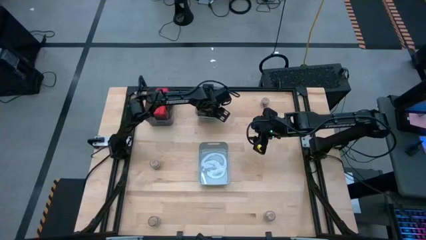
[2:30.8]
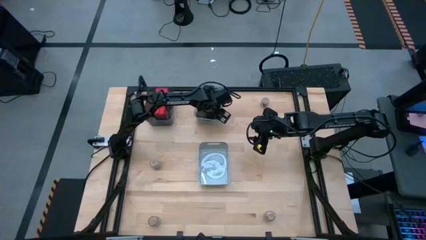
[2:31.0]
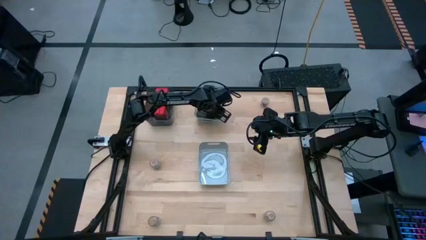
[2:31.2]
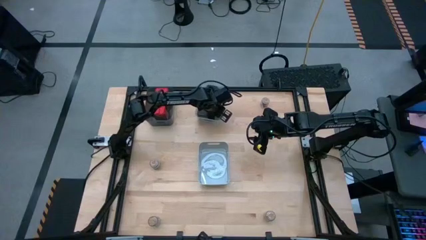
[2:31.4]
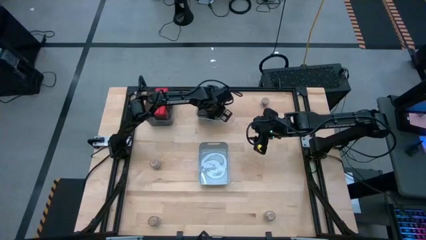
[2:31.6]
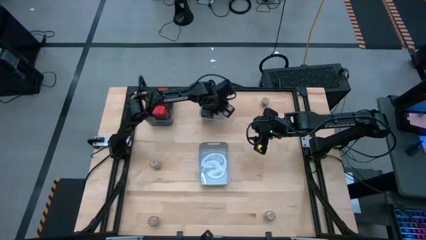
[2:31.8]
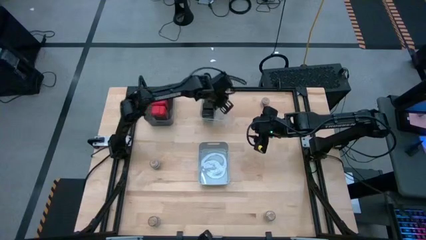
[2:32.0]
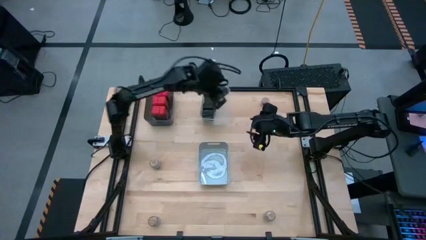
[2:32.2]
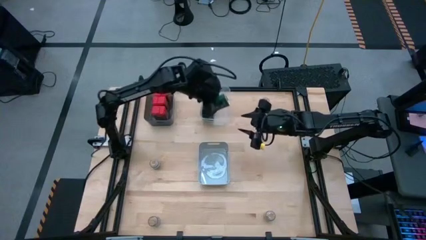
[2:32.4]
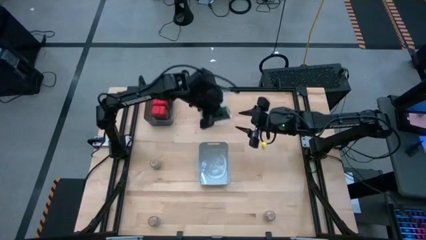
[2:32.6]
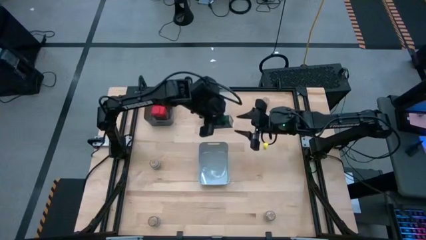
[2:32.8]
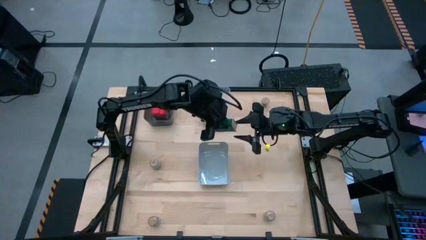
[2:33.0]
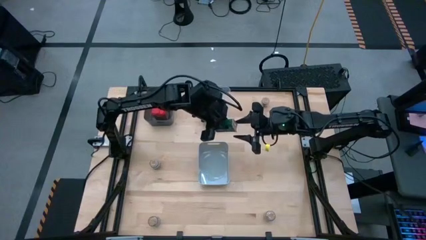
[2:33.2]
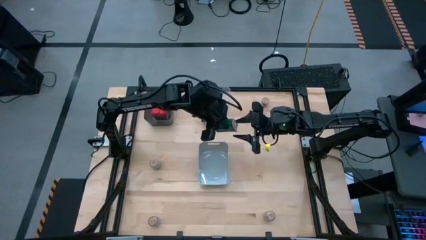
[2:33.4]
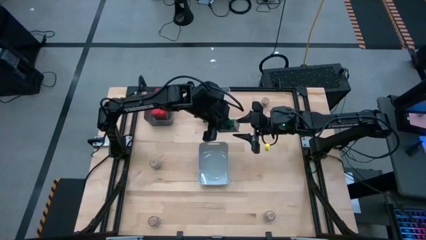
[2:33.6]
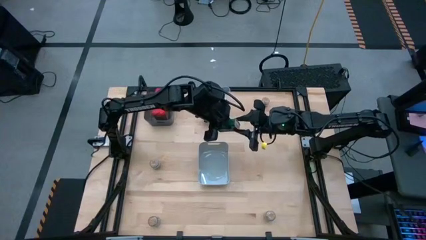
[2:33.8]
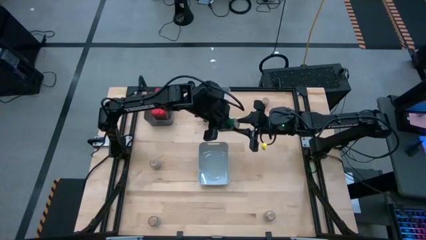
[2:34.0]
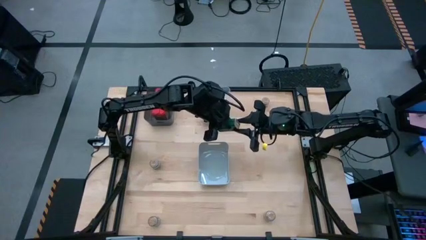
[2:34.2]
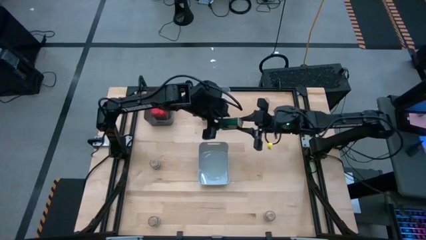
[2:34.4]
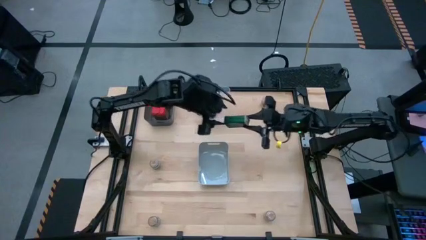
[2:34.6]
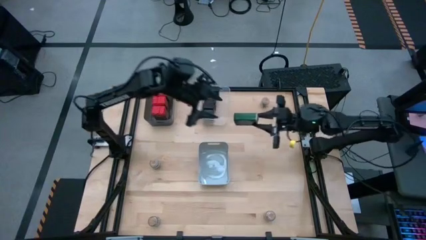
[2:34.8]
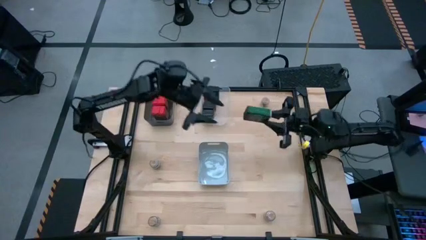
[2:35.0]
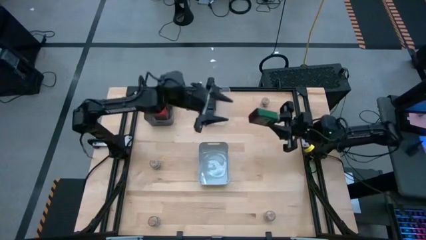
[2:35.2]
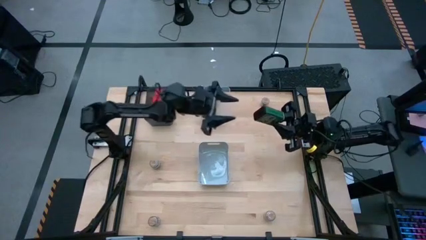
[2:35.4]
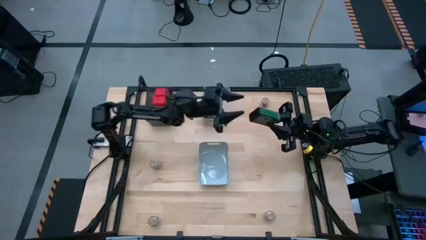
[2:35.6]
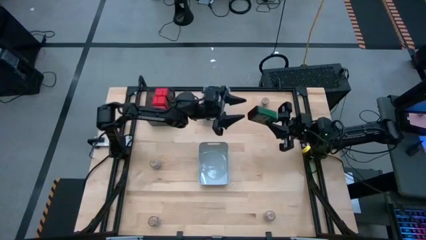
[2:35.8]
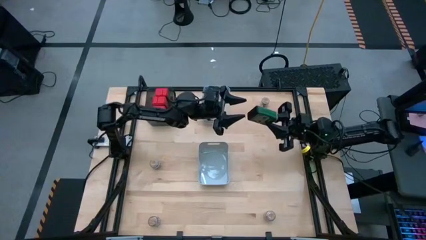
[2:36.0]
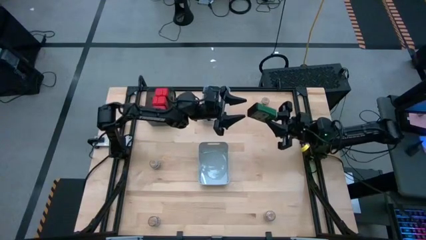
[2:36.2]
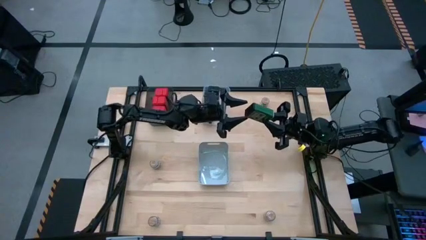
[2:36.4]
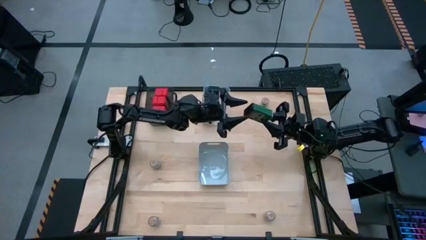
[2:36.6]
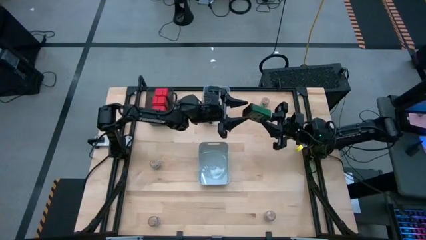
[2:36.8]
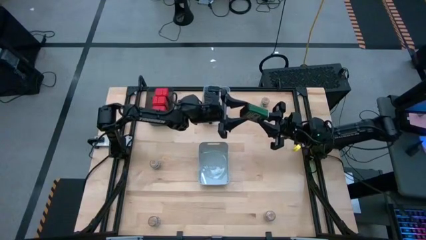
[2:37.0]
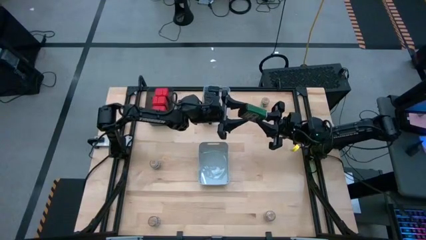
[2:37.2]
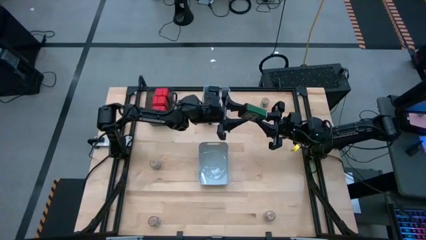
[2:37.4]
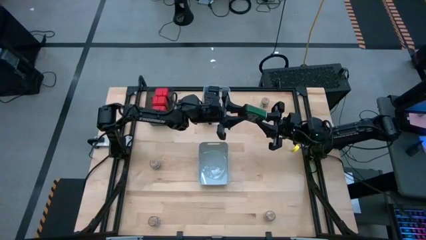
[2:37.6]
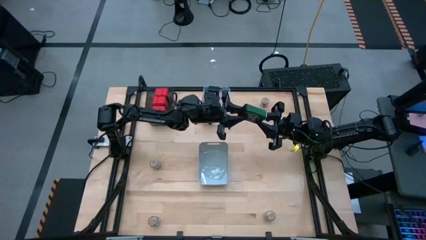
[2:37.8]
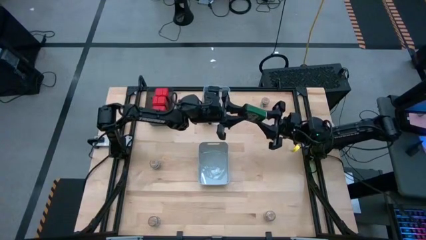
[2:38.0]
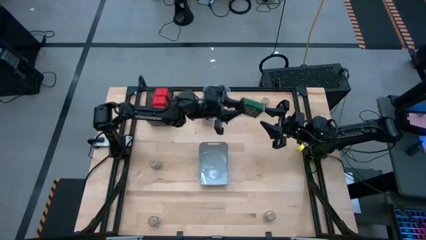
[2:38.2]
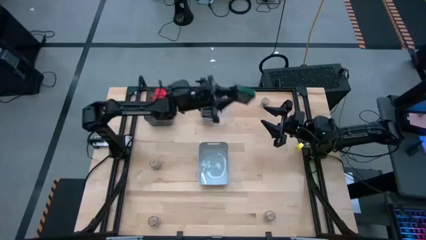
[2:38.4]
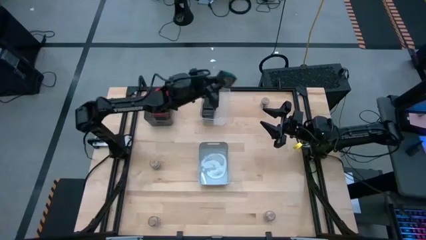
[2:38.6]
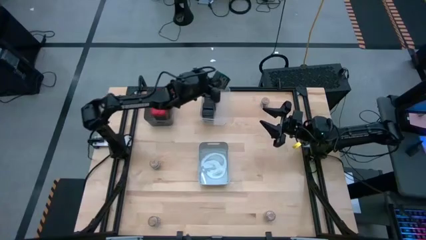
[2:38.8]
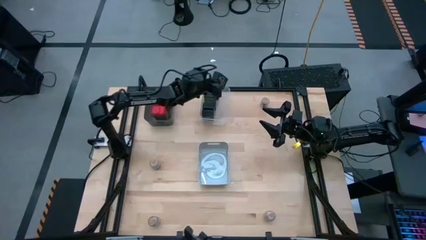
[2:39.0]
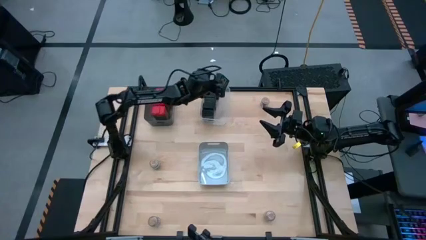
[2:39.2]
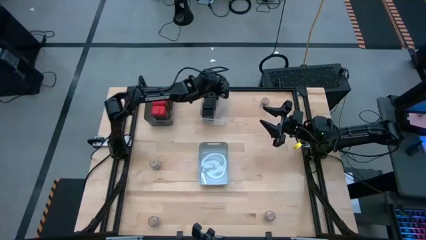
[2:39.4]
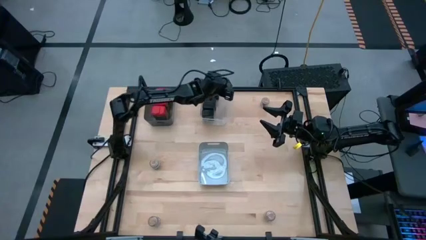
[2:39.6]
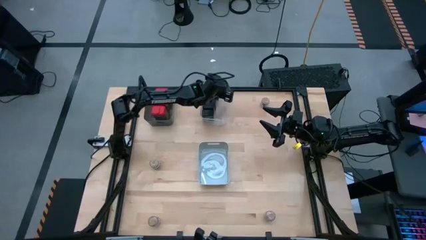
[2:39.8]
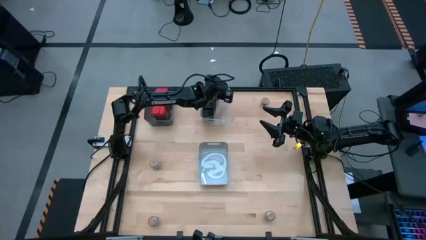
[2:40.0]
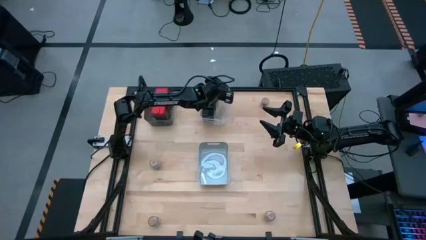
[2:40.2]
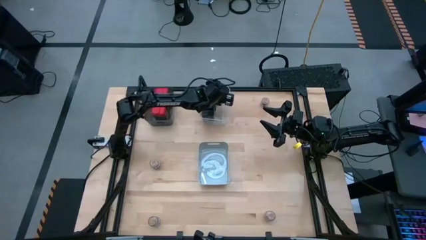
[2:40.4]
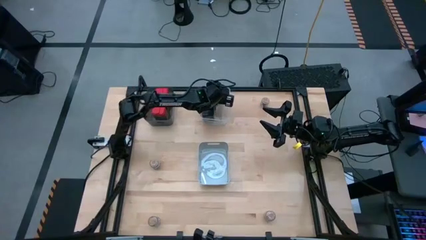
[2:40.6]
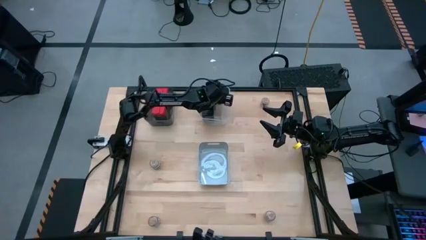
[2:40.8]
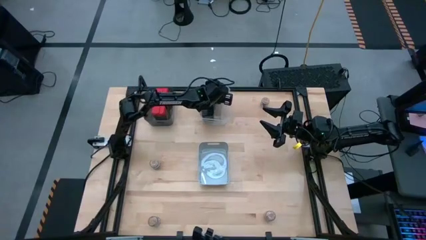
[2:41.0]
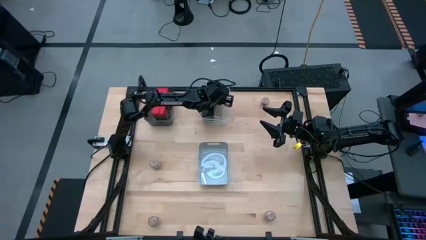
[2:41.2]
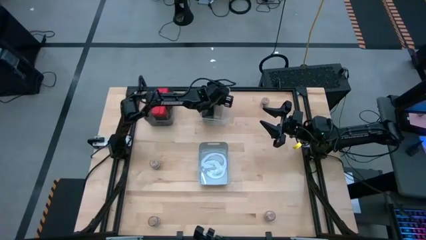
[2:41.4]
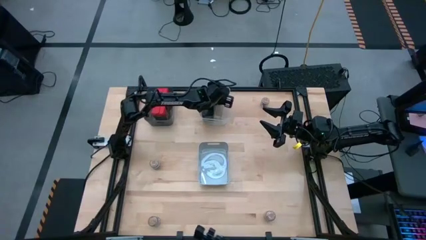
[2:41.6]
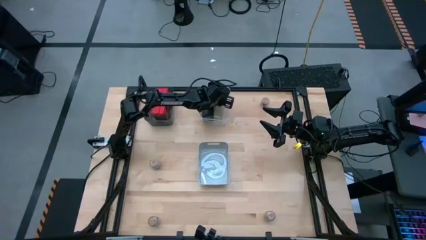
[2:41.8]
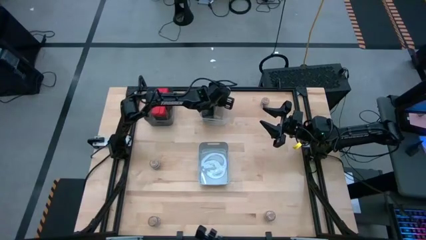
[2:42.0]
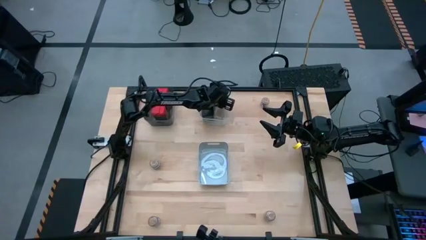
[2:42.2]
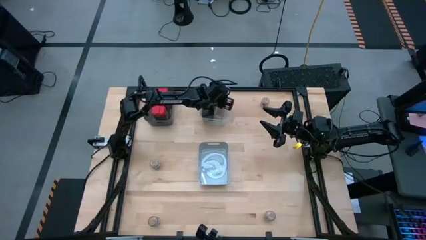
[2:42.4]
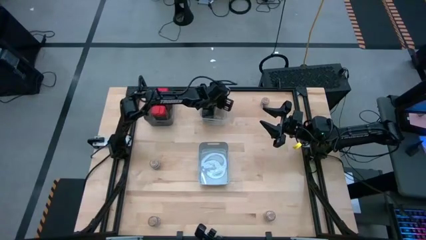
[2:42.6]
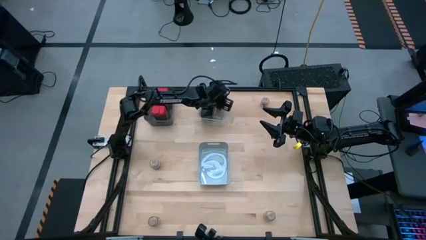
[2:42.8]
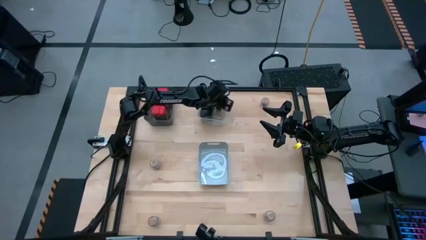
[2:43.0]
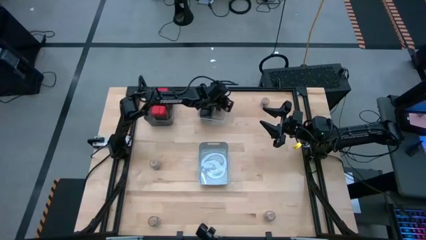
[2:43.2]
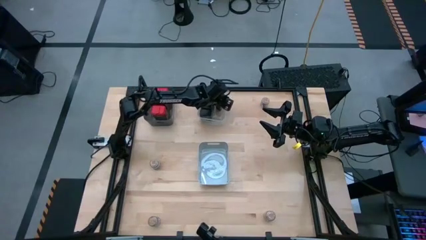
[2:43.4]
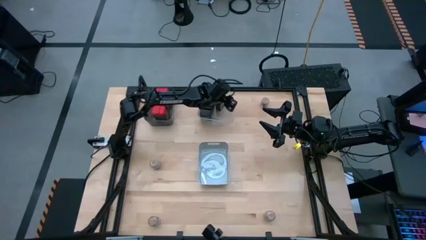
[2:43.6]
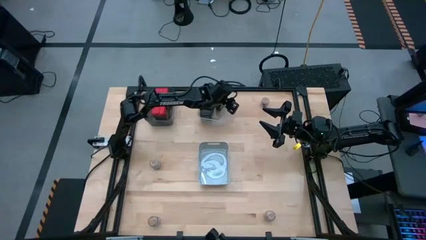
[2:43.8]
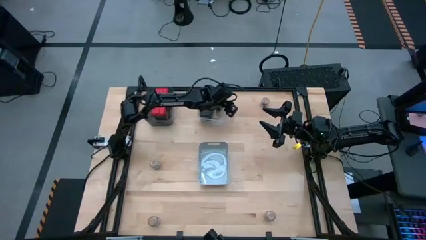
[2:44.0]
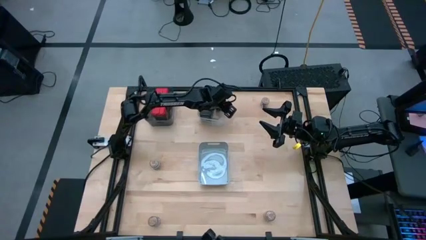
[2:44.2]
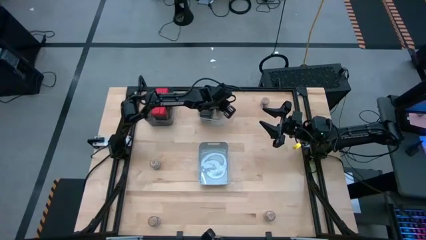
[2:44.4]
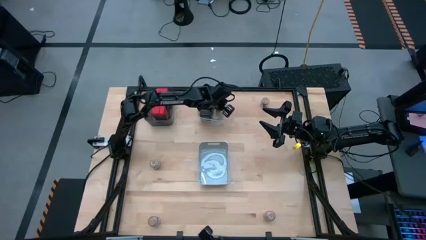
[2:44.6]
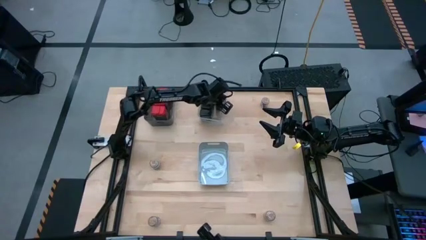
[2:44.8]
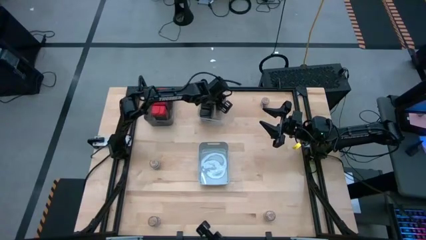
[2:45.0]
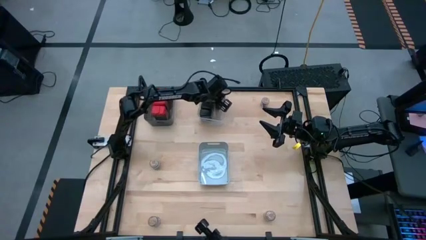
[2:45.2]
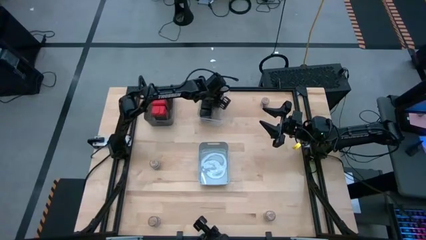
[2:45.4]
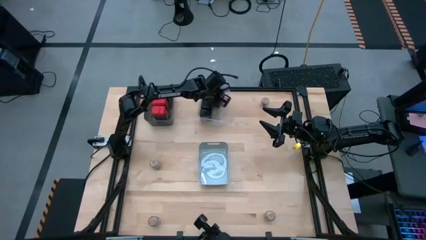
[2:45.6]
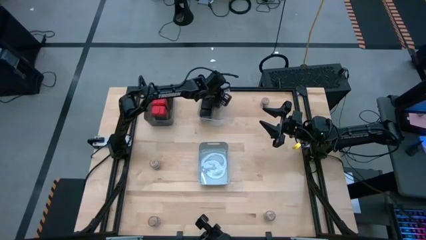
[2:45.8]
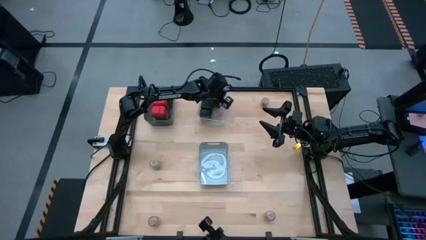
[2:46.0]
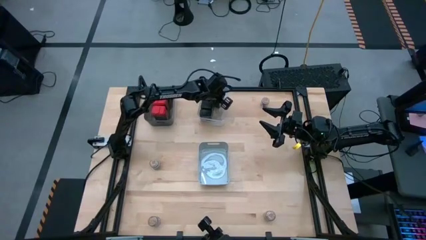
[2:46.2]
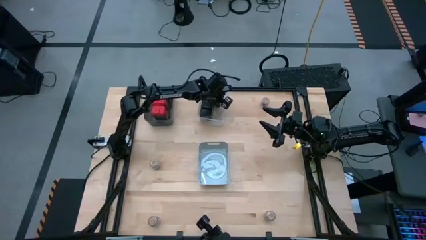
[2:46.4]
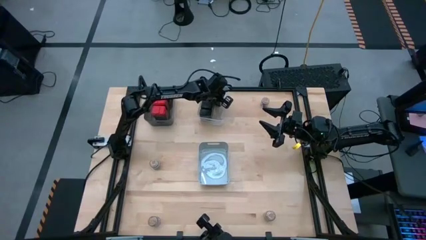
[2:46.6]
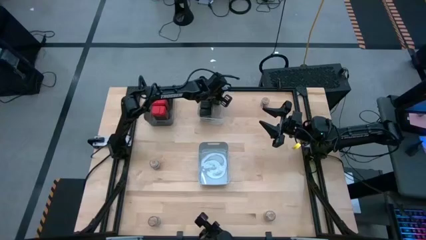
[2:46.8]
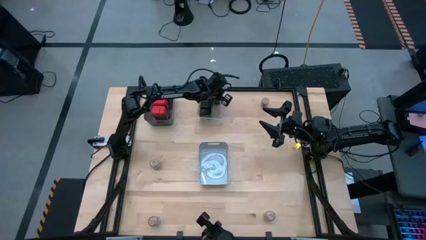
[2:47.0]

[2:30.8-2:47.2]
Task: Sort spices by type
Put the black seasoning can into the transparent bin

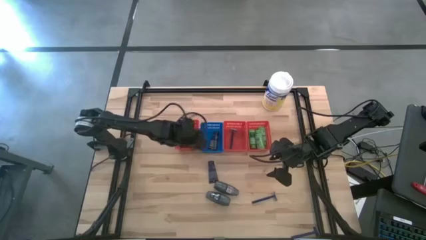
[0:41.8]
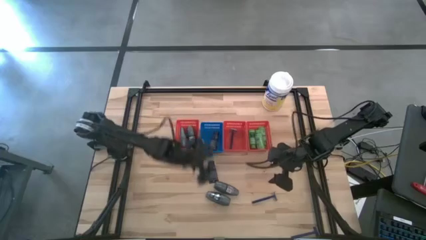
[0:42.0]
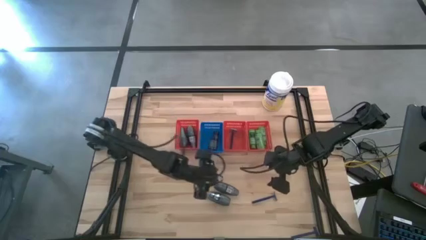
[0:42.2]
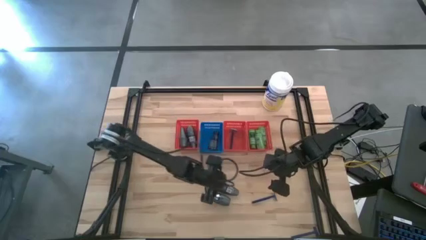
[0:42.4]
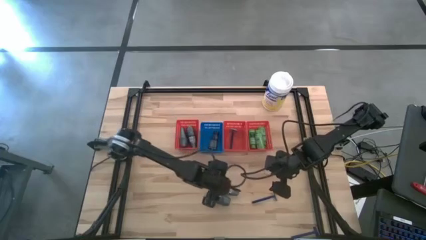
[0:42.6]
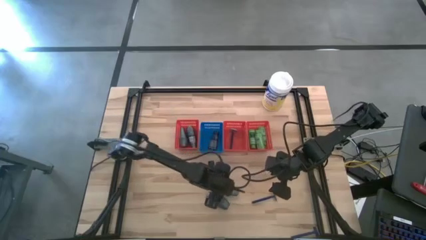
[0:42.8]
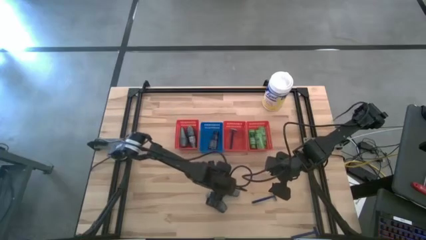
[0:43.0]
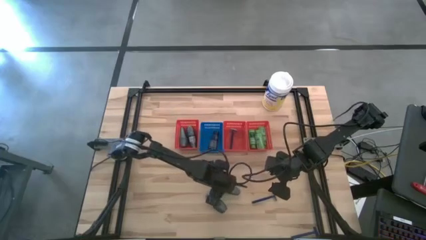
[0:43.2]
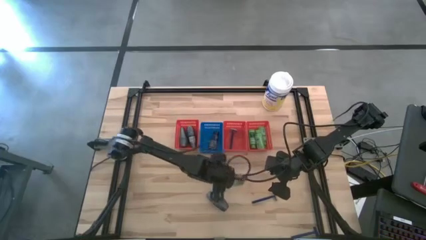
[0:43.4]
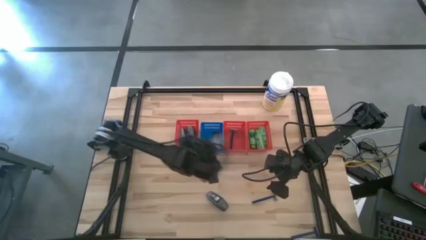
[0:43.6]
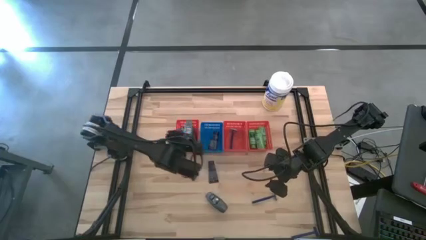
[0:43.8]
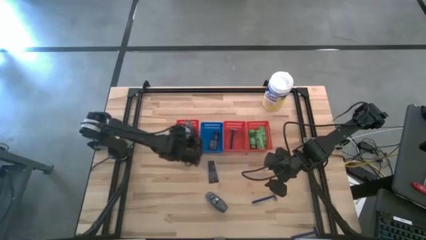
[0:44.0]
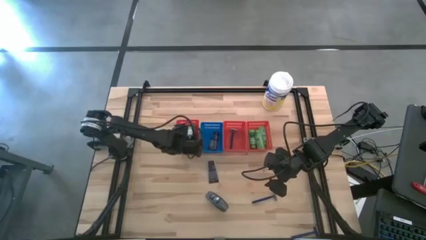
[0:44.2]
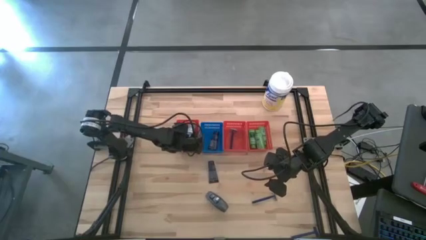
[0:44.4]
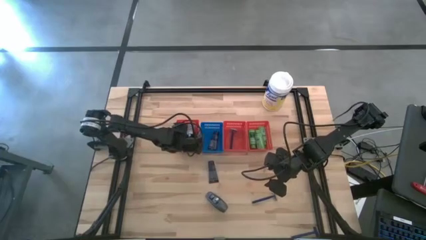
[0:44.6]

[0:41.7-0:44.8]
Task: Pick & Place Travel size toiletries
Put the black deodorant into the left red basket
